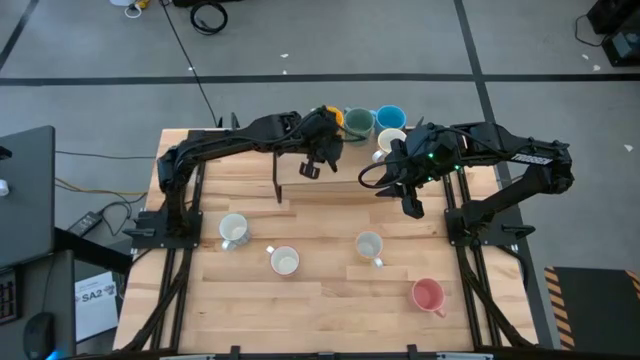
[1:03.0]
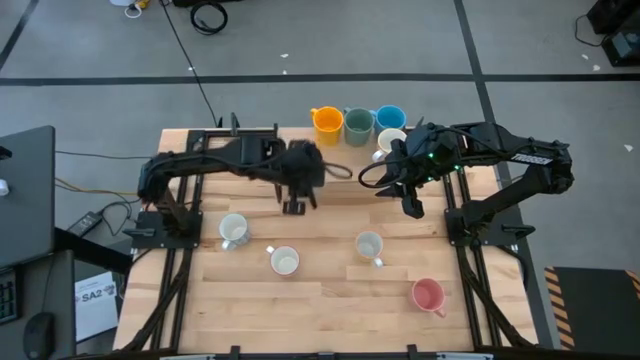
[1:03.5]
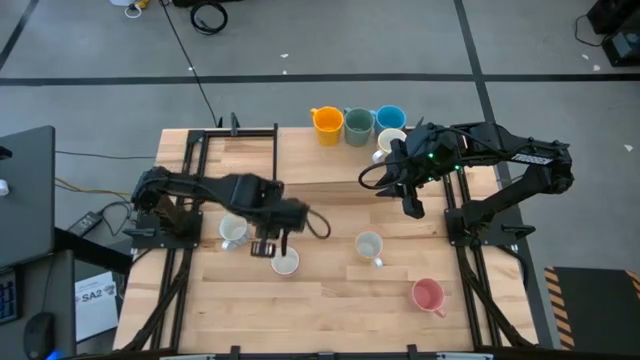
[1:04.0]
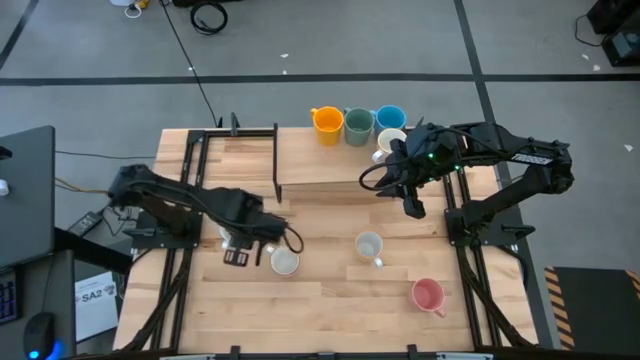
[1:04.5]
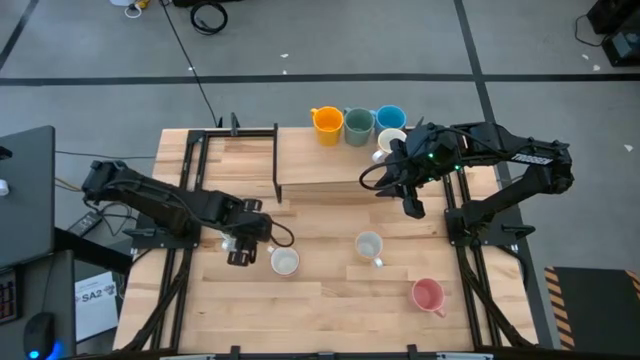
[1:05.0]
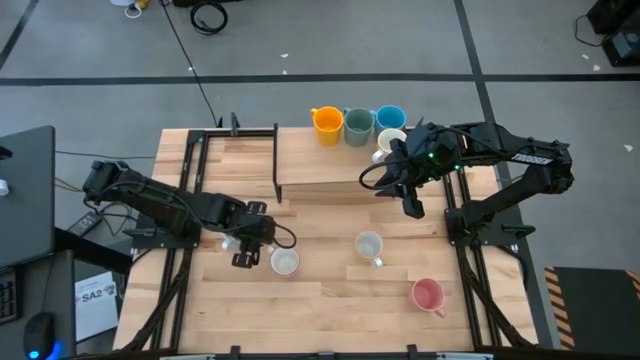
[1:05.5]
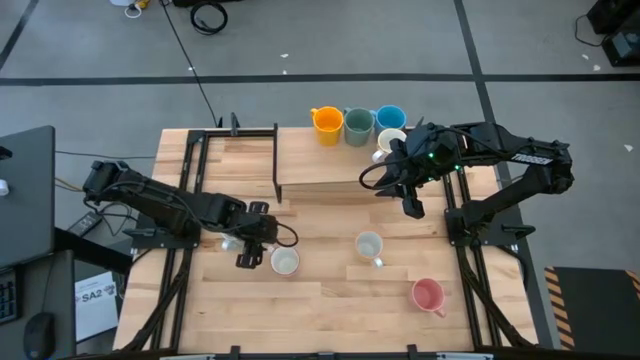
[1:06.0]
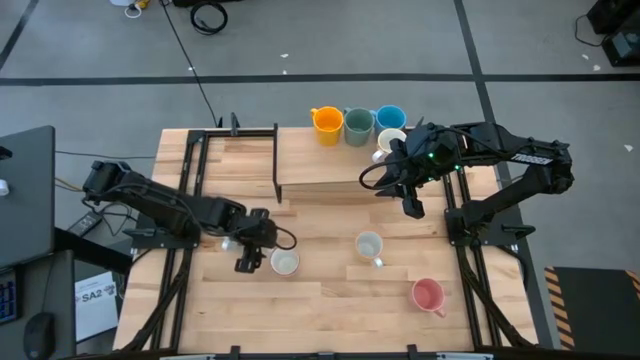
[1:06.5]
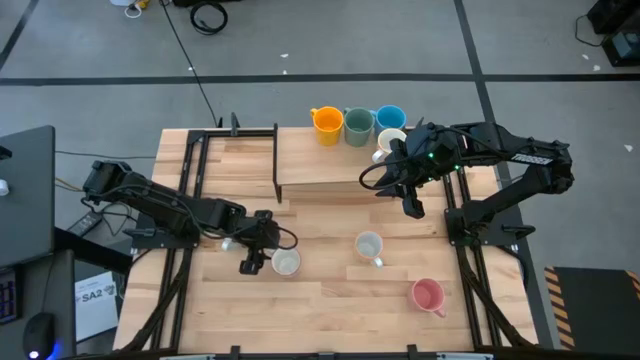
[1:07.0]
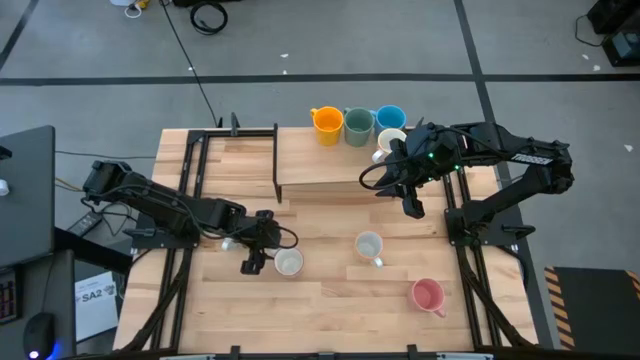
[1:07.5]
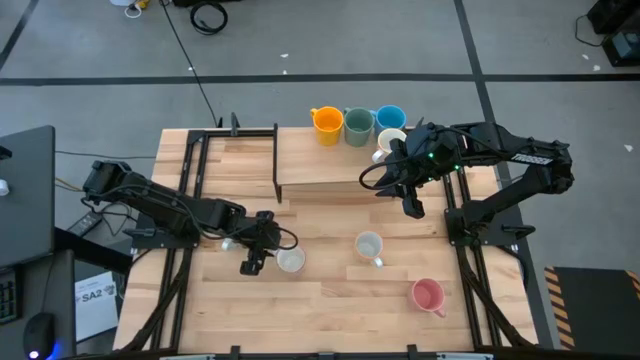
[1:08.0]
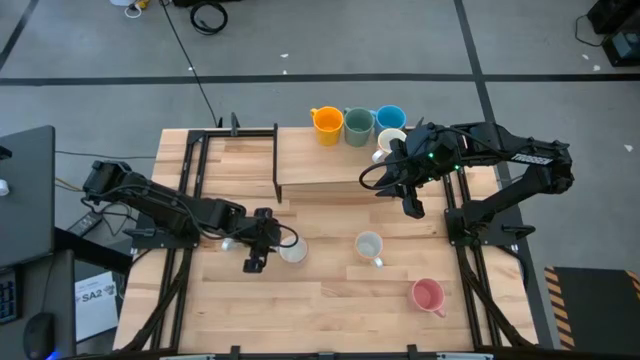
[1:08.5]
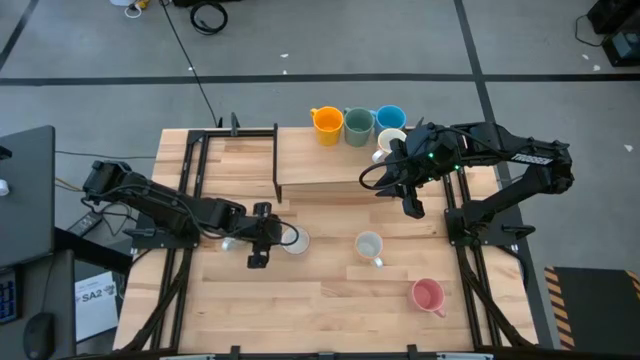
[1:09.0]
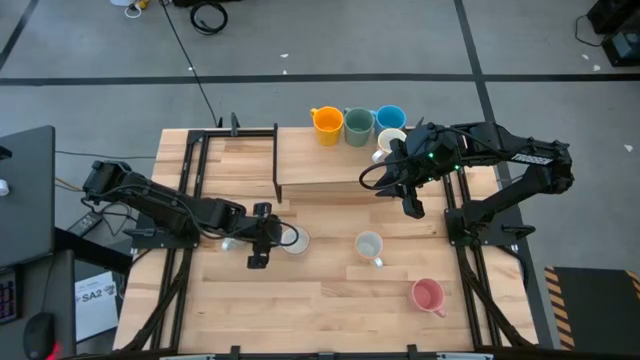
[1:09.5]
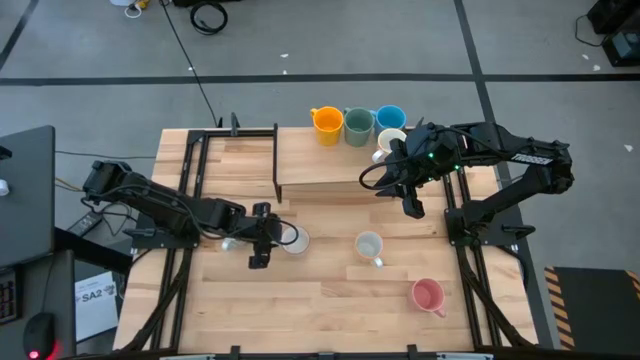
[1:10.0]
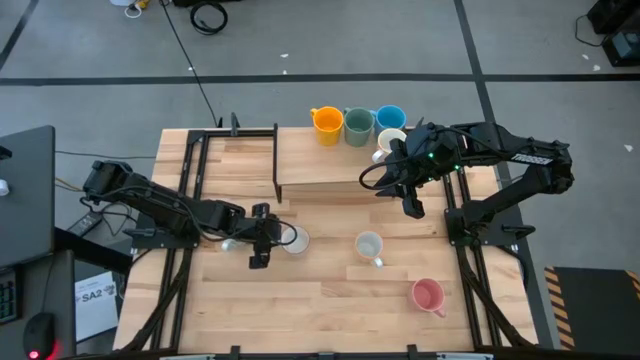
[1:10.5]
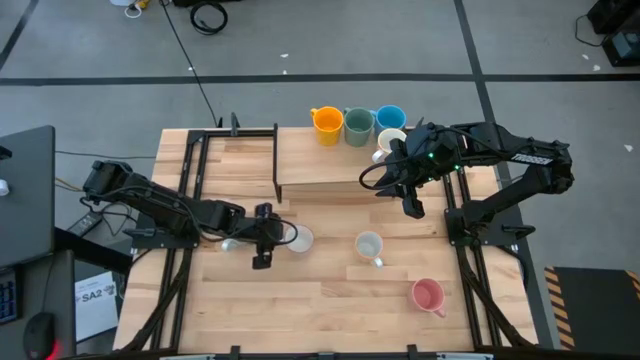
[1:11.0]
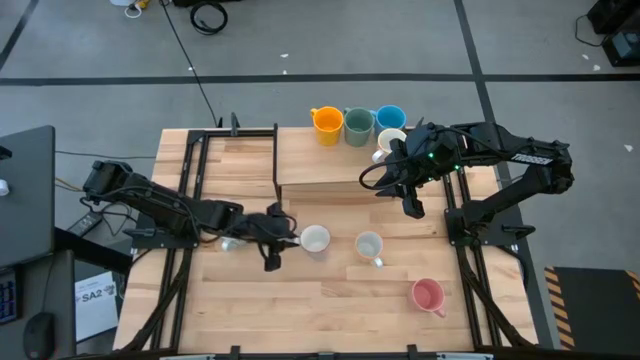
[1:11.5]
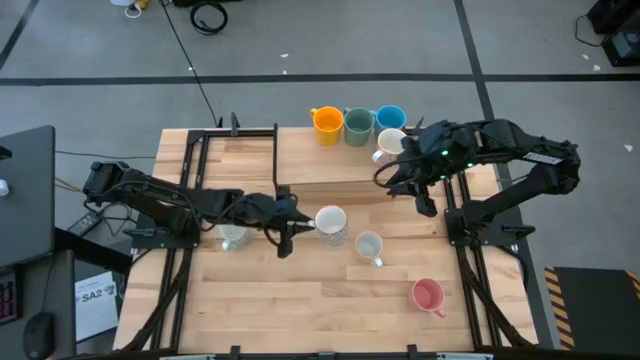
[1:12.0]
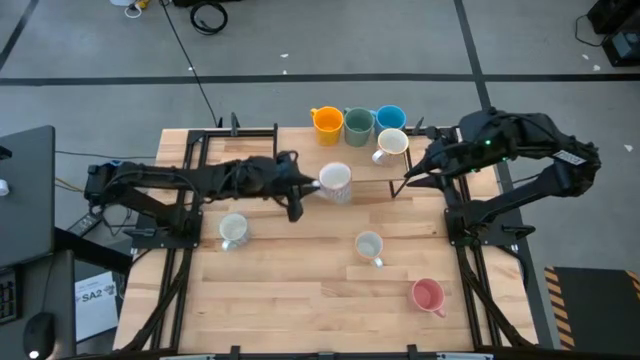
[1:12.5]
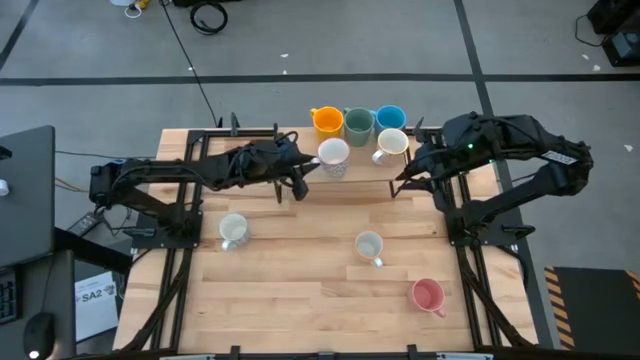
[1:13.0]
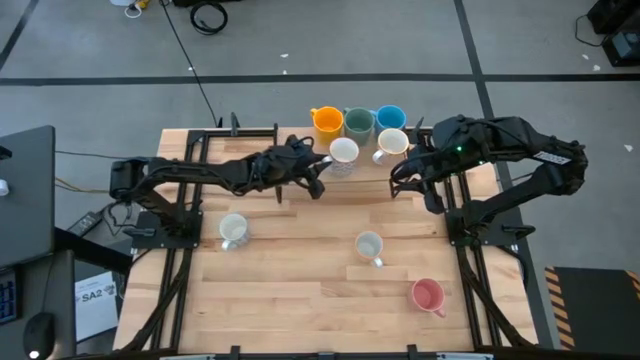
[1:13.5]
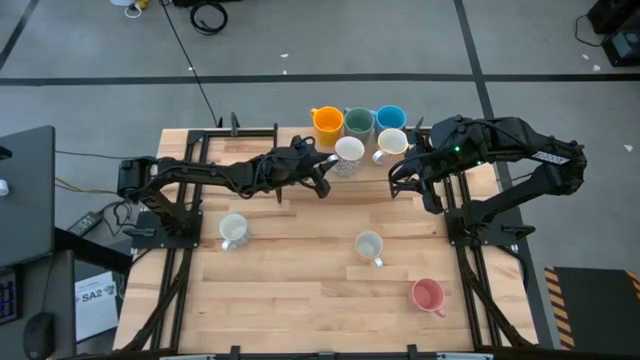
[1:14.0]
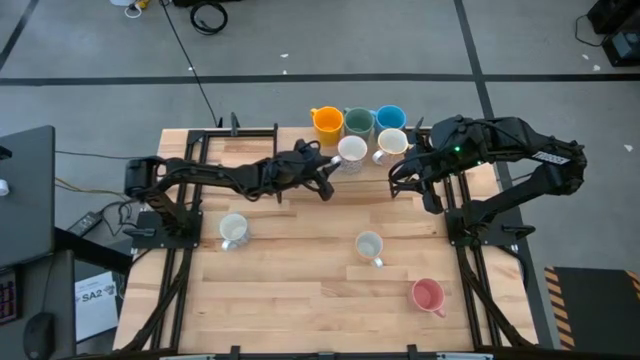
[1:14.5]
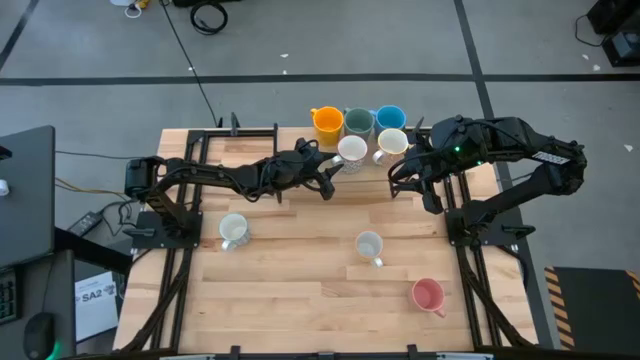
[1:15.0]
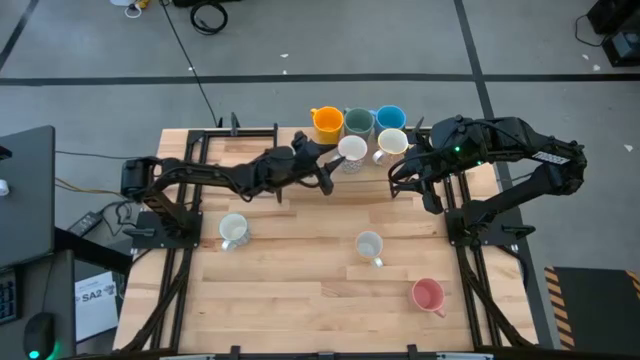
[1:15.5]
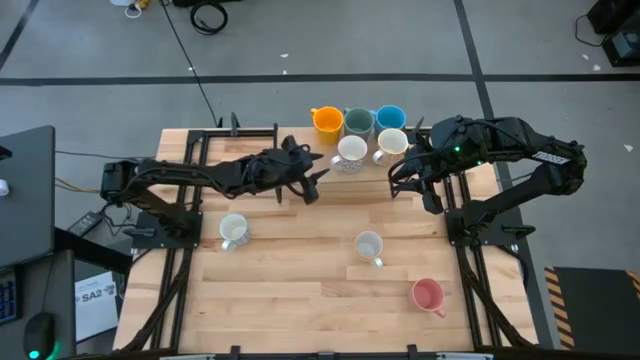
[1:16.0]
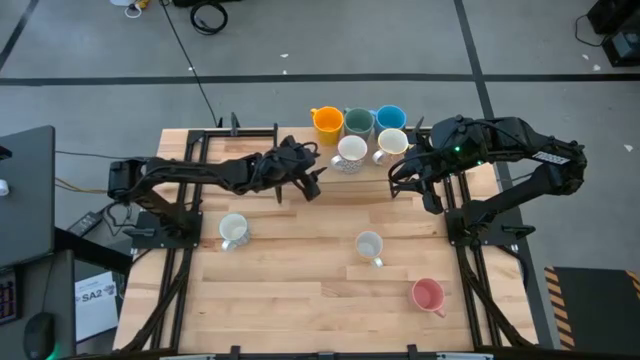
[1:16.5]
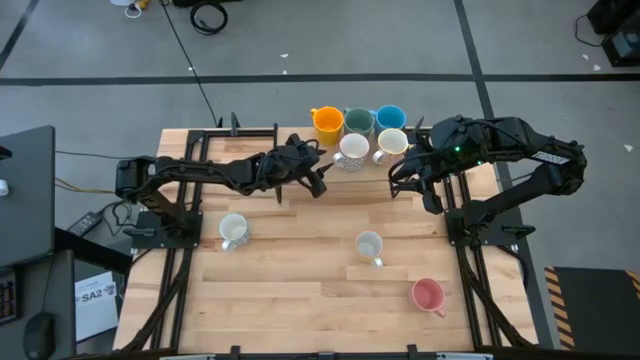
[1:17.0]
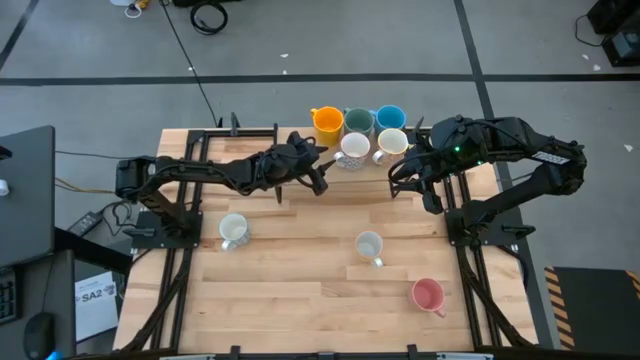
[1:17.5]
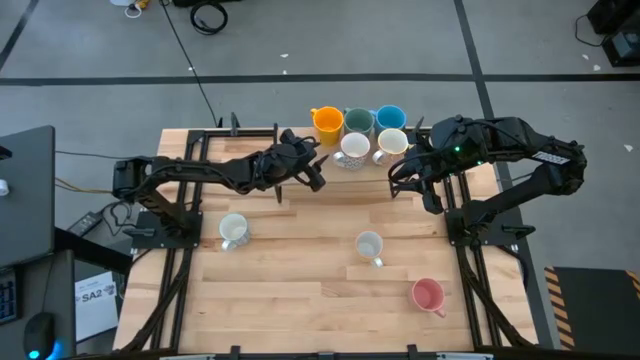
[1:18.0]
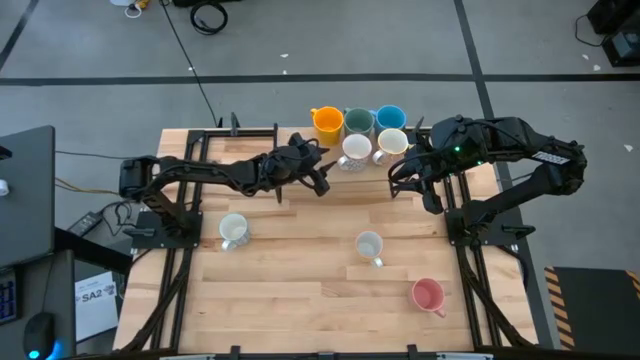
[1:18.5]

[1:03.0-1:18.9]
Task: Place coffee mugs
Put the white-gray mug on the shelf

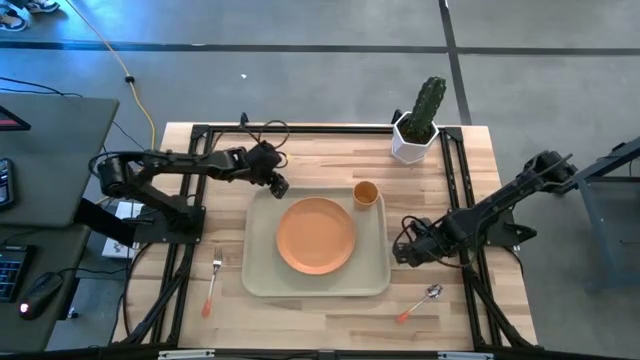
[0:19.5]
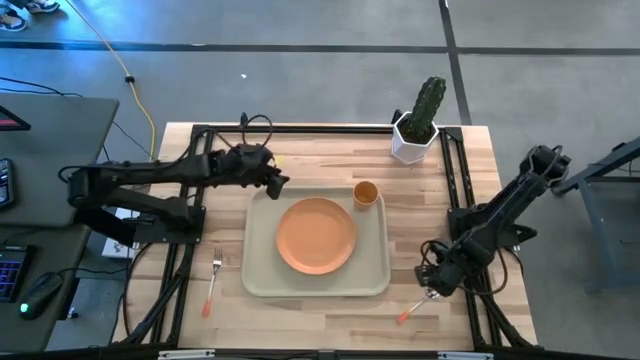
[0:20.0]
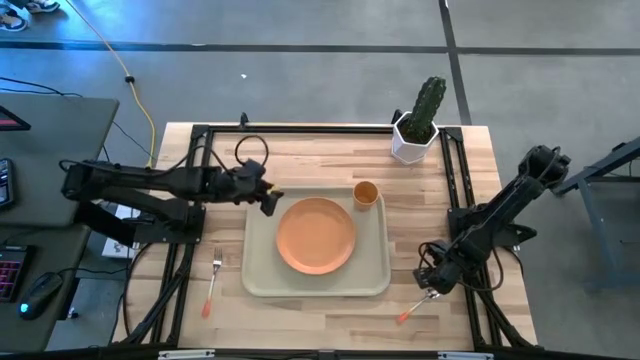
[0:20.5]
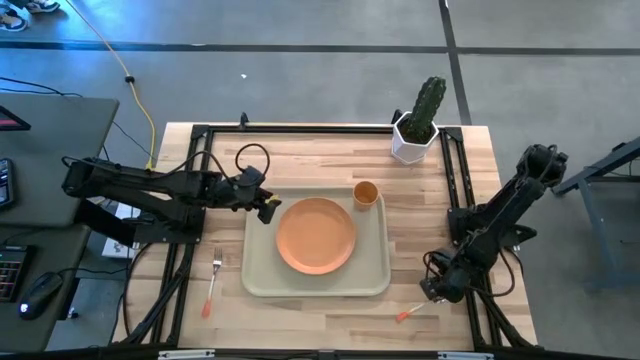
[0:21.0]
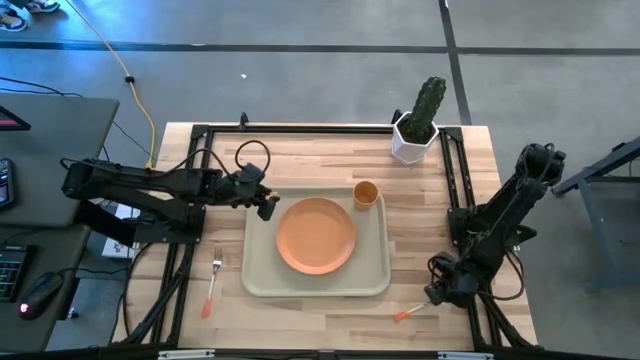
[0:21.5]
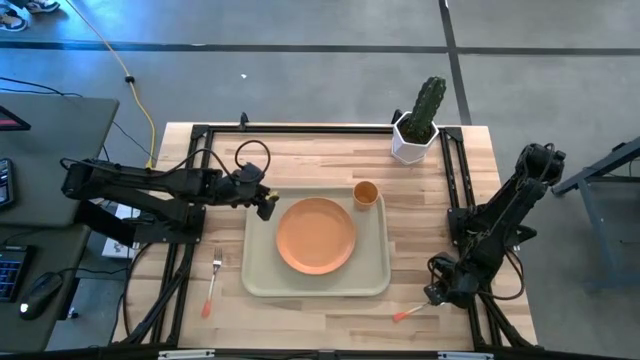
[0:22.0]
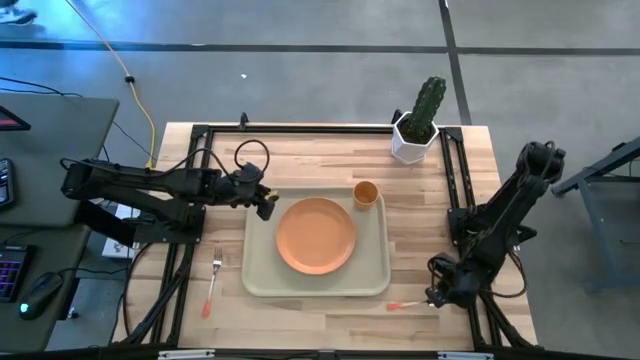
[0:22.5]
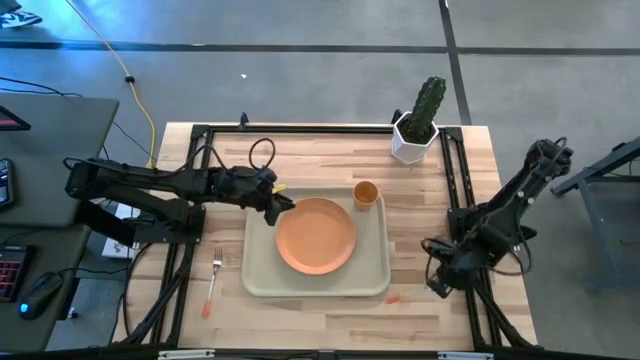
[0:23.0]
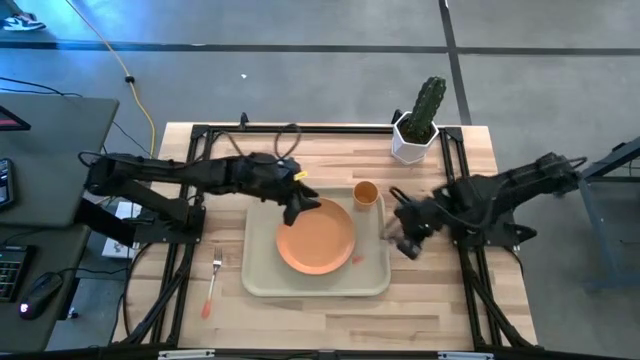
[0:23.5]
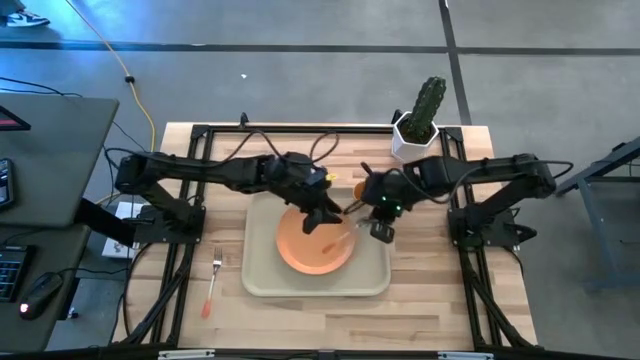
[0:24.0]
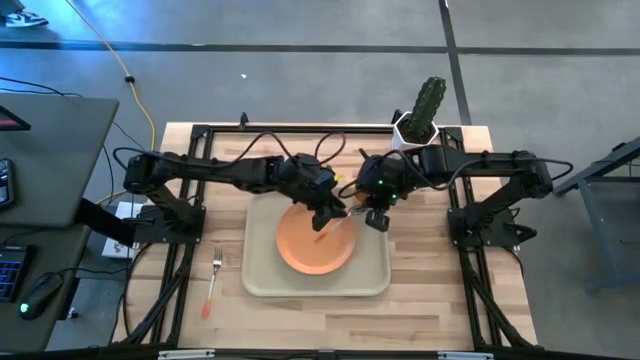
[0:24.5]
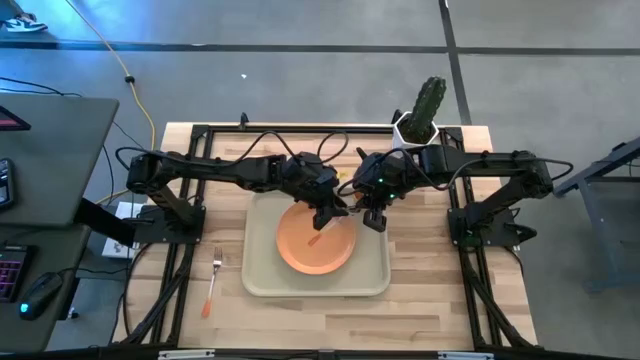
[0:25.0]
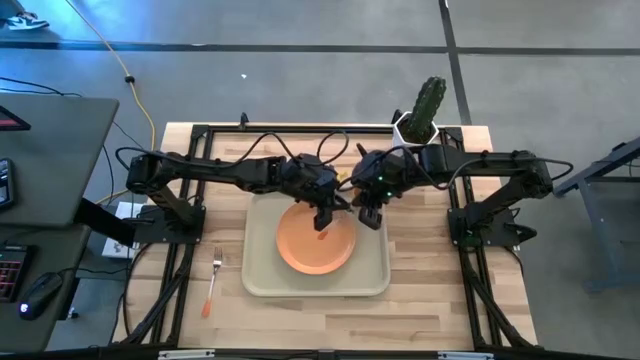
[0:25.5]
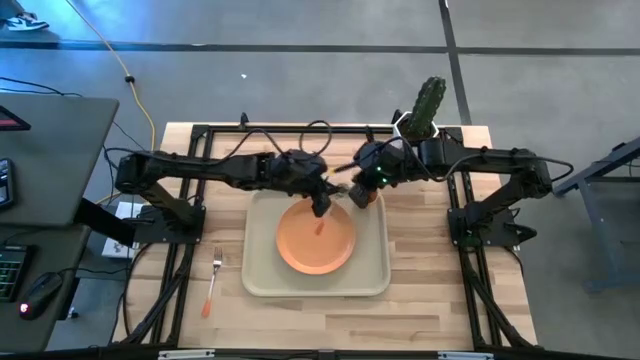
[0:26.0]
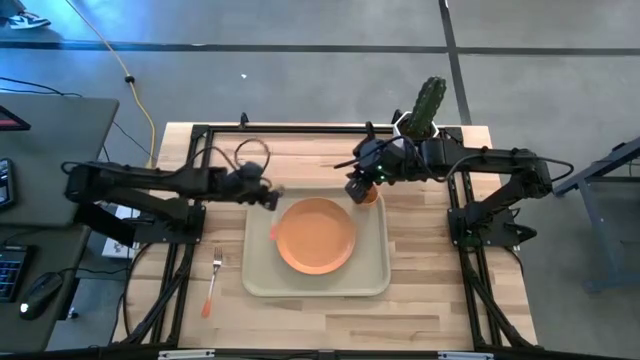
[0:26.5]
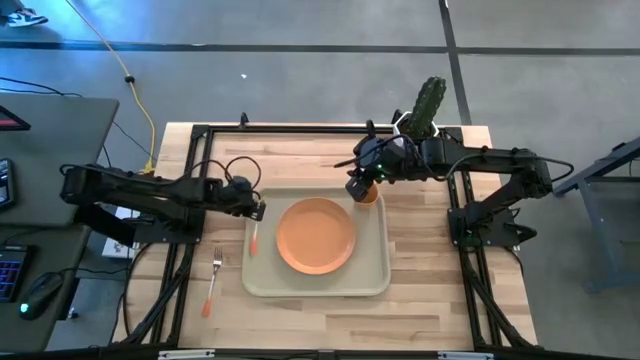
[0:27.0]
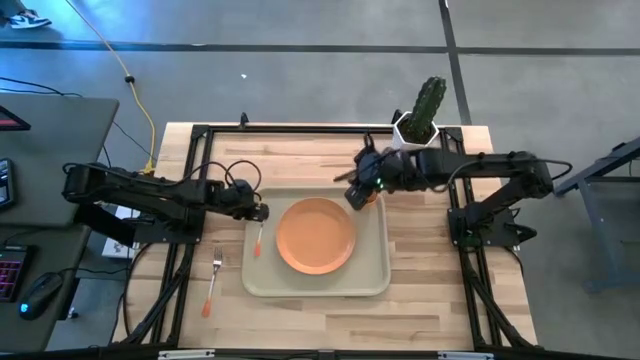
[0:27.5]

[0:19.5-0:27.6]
Task: Pick and place plate/cup/fork/spoon on tray
Put the orange spoon beside the orange plate on the gray tray
